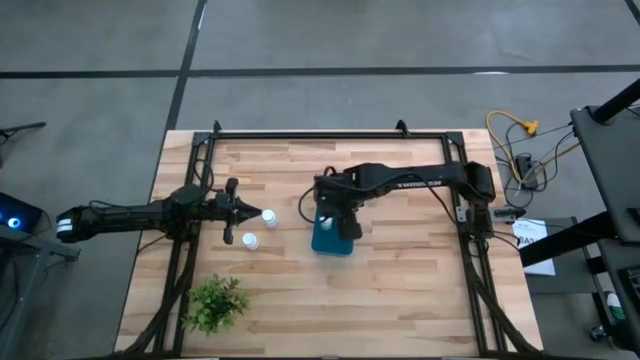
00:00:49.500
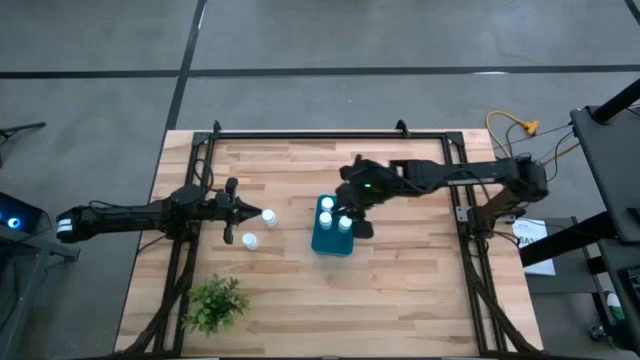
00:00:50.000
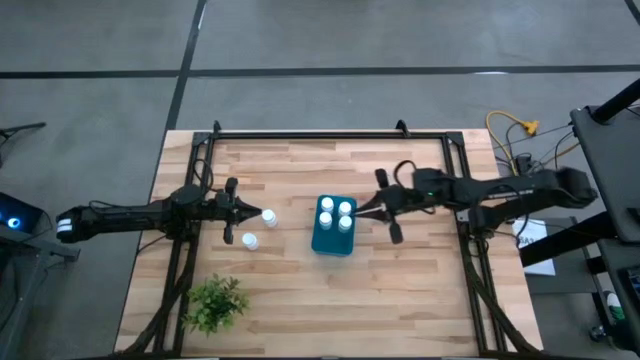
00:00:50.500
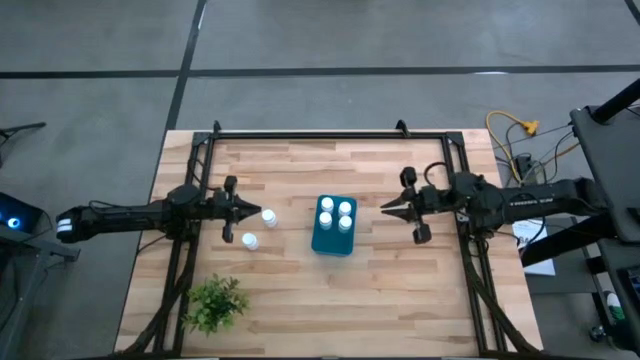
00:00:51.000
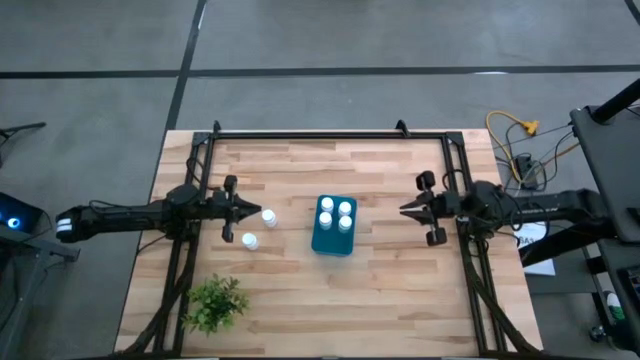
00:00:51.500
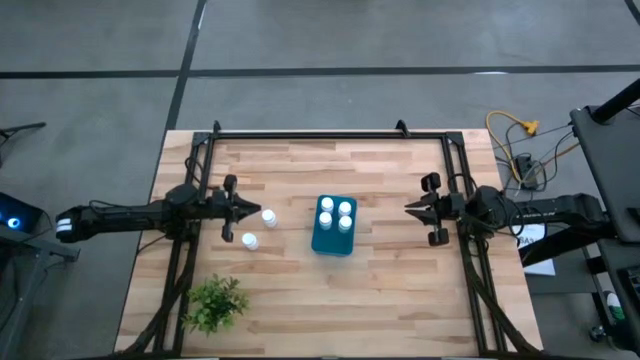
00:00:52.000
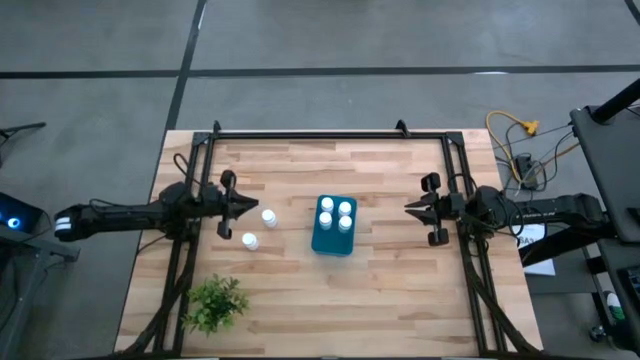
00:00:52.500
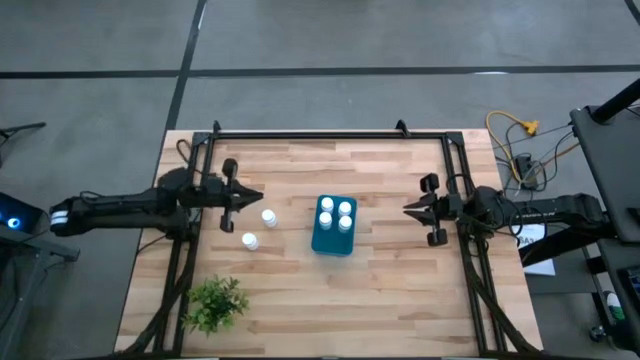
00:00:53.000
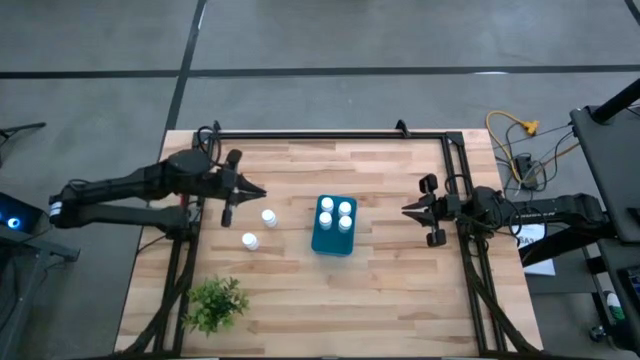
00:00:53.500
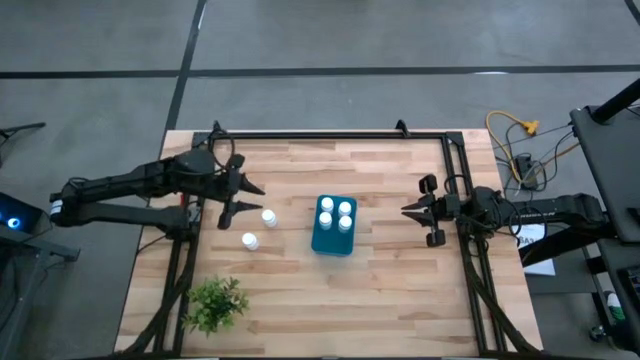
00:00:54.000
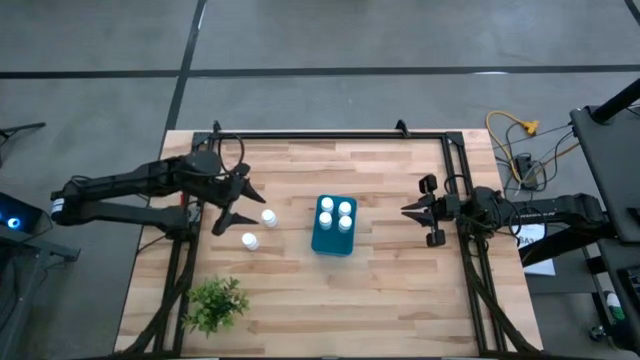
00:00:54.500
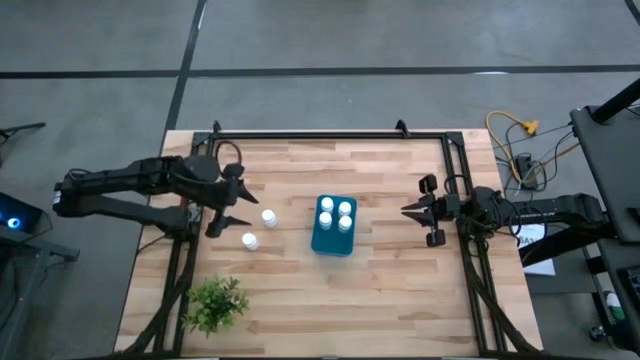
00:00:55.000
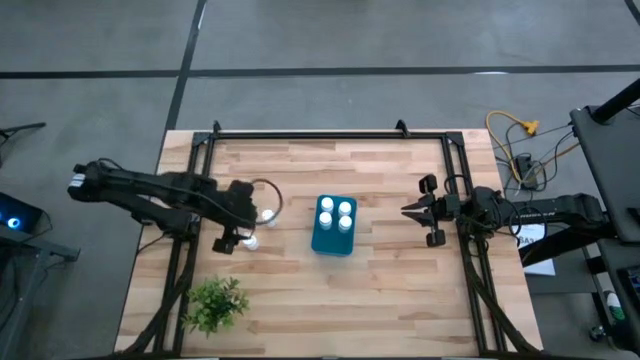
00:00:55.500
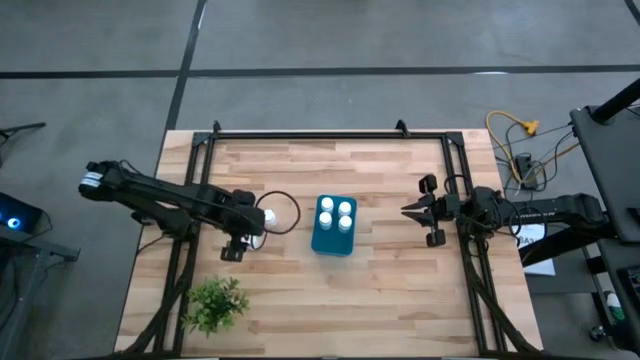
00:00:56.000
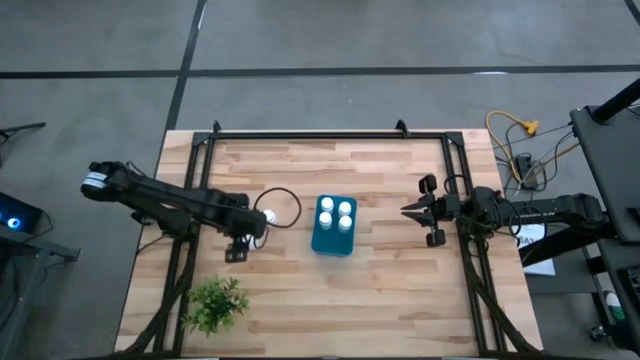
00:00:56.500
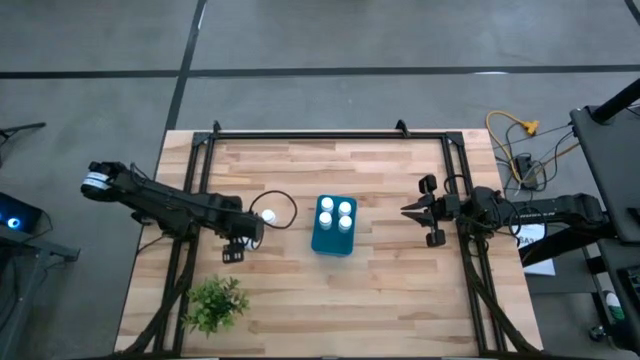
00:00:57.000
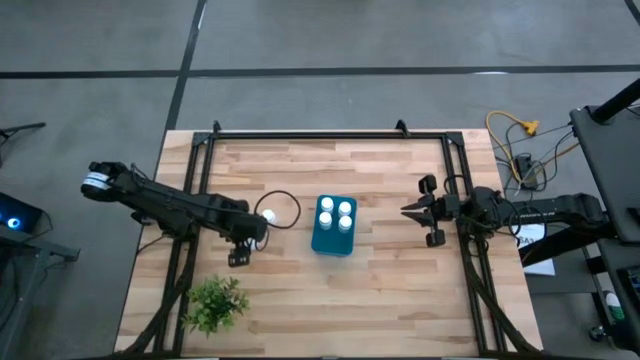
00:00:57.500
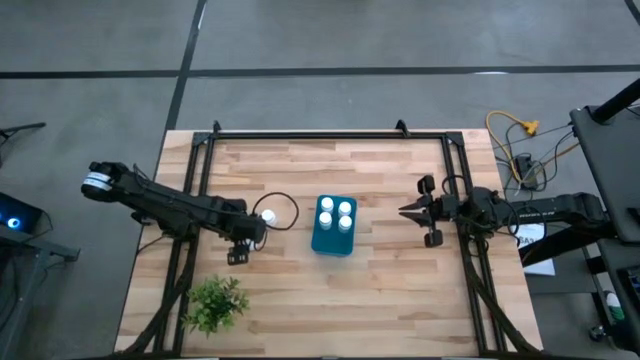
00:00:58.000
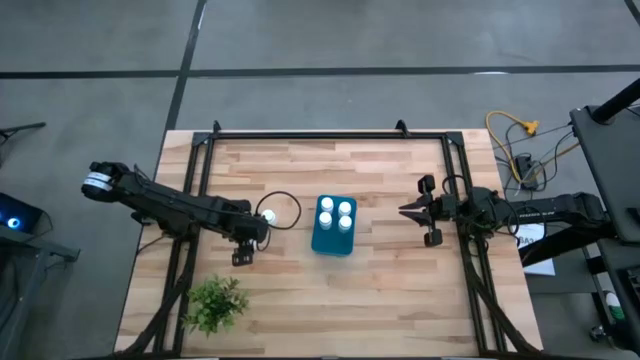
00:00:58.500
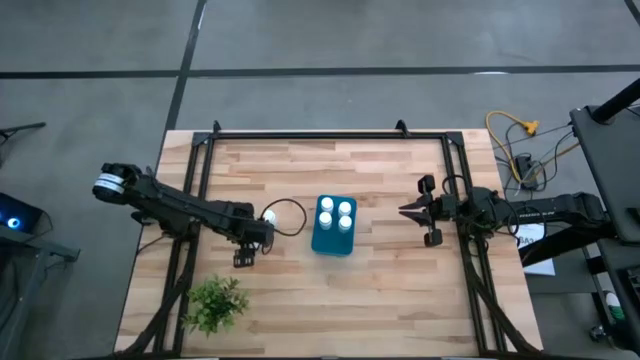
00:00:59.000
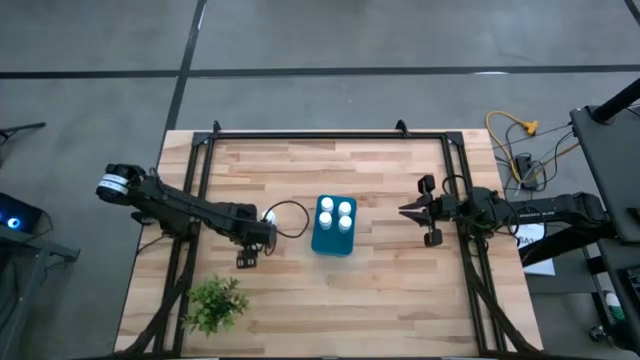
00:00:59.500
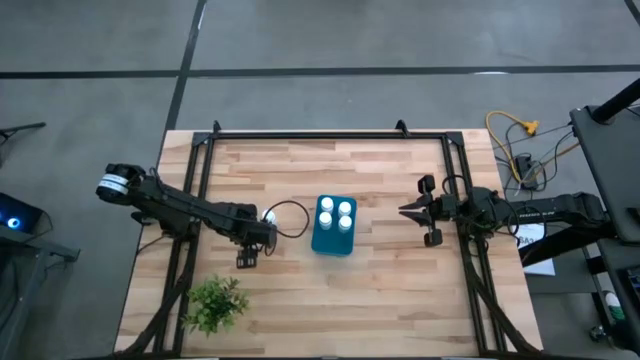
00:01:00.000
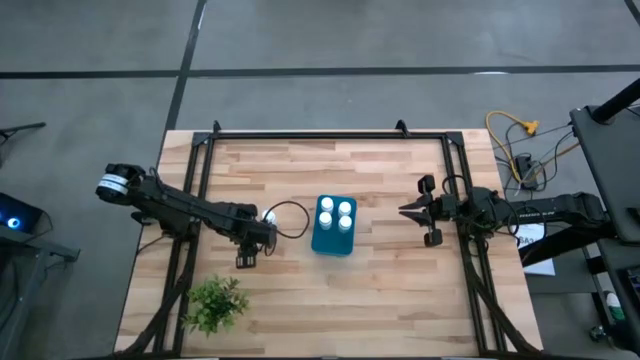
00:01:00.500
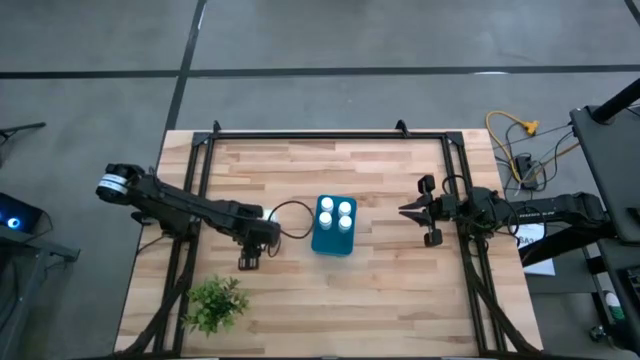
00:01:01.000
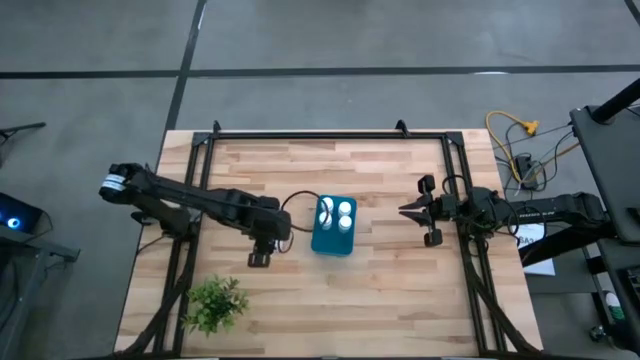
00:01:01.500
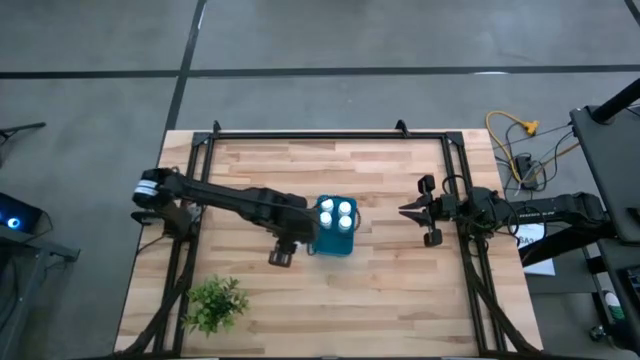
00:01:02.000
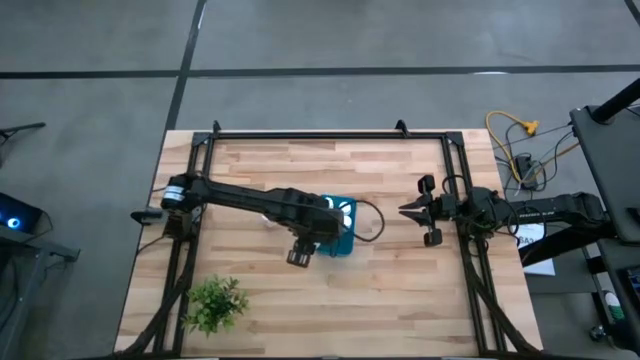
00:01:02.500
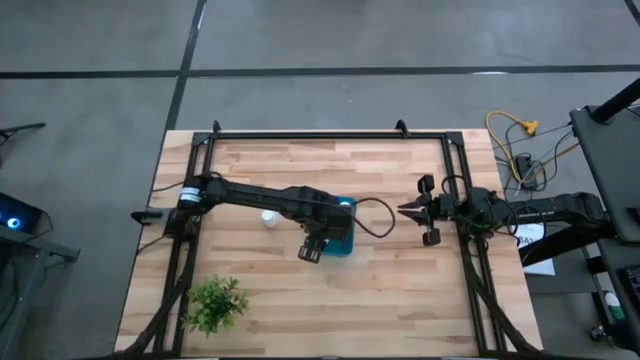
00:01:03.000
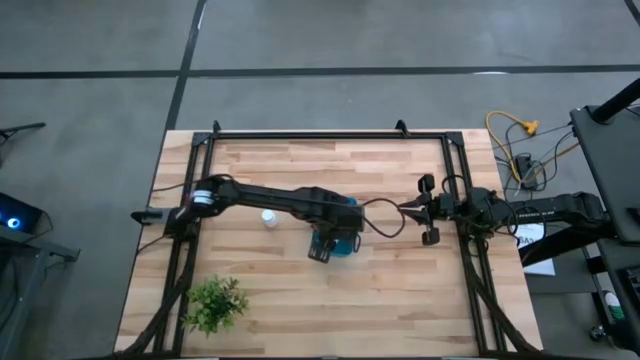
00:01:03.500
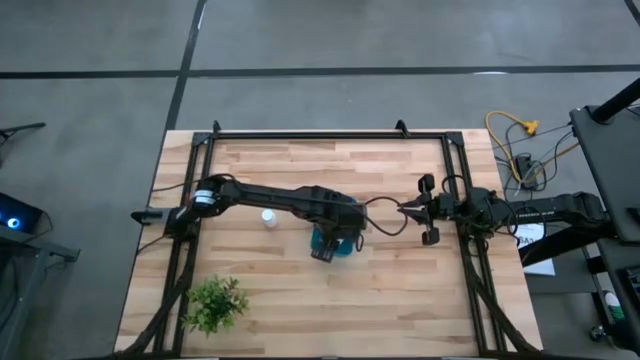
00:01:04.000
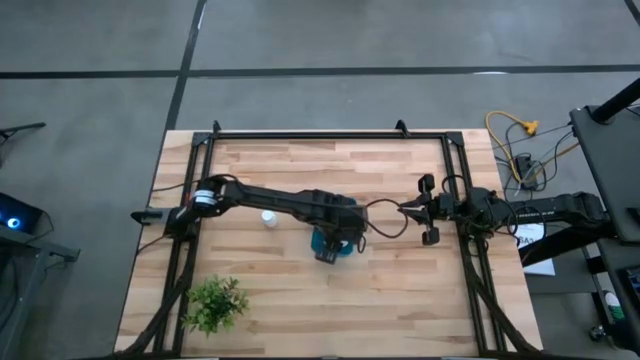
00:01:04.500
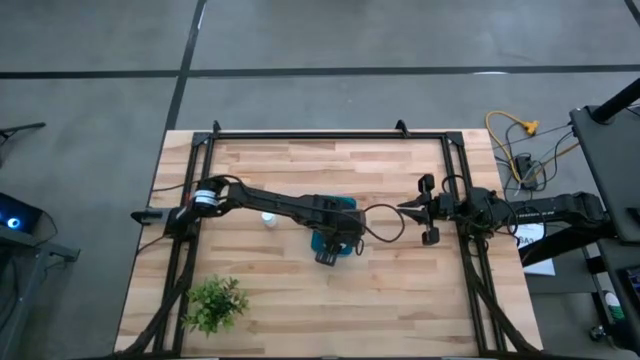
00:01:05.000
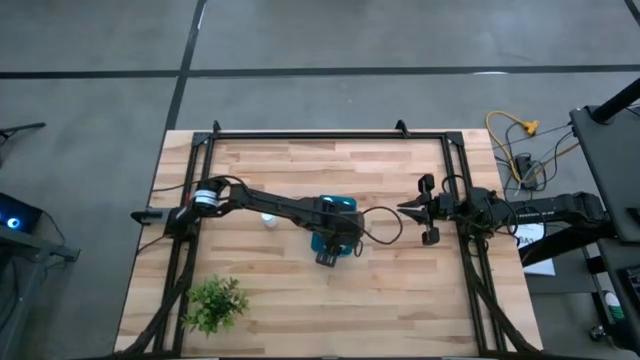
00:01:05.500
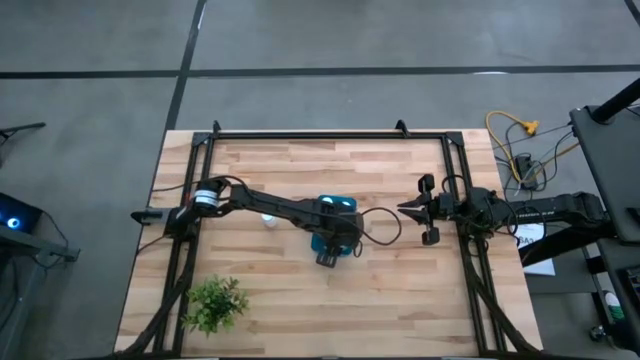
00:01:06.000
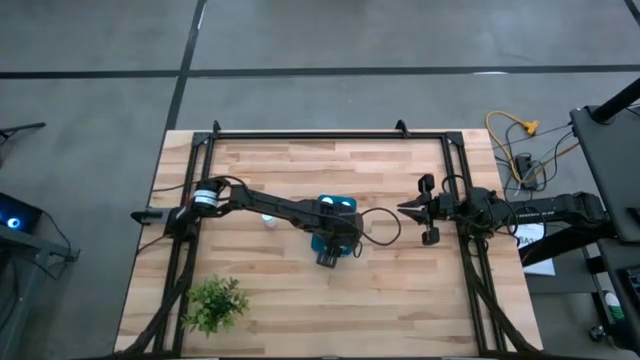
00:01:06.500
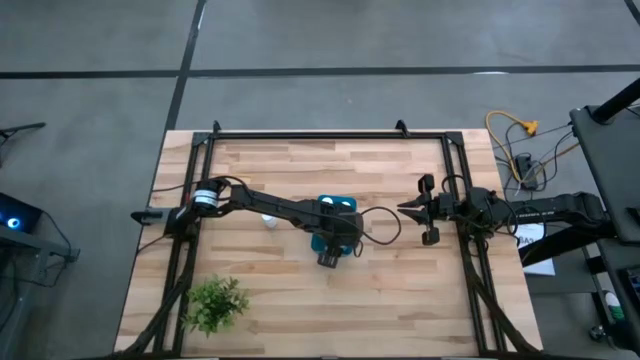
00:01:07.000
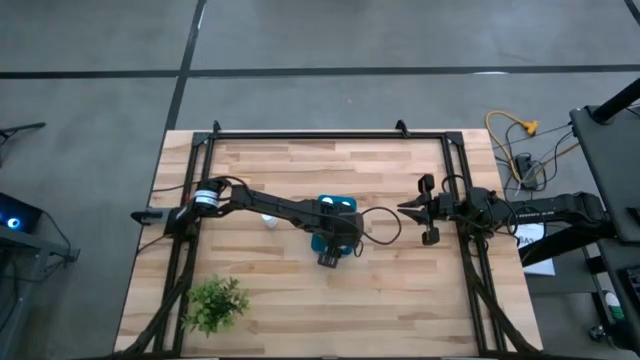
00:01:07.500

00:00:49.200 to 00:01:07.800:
Task: Pick and place pill bottles into a basket
Put the medicine bottle into the blue bin

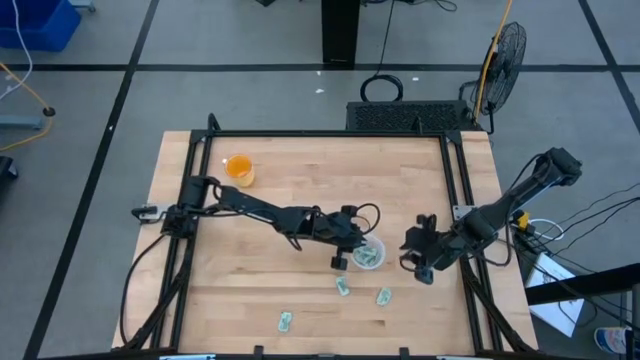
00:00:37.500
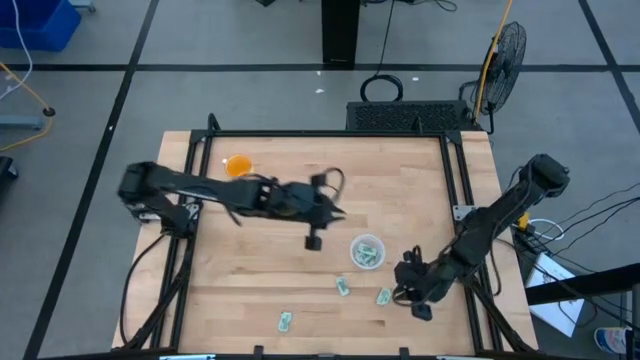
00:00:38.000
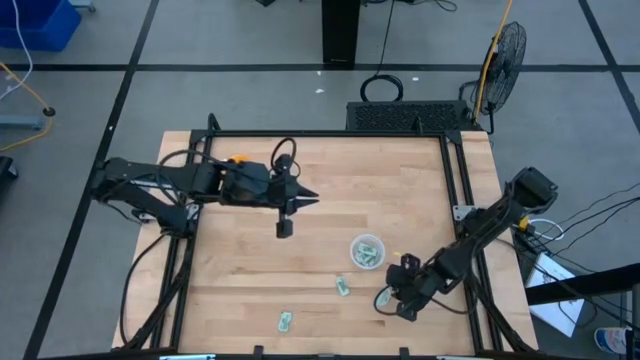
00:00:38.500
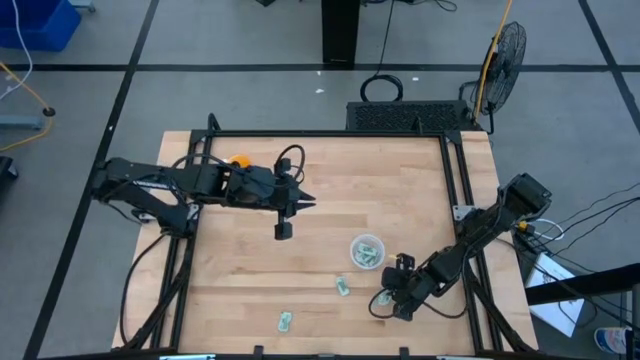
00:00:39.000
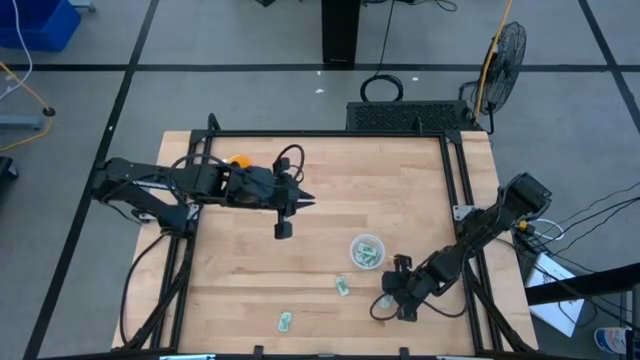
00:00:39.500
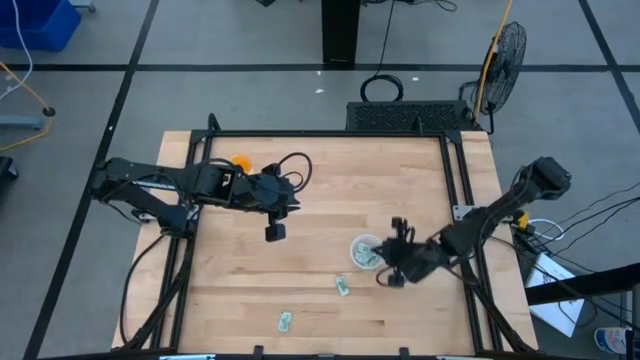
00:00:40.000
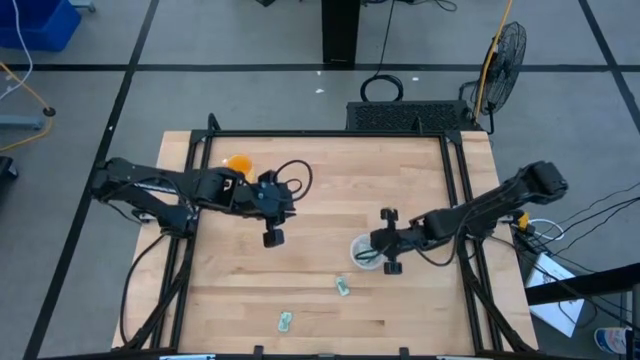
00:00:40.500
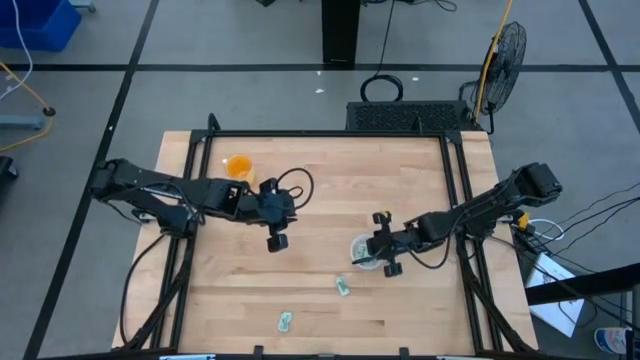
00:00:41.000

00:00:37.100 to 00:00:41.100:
Task: Pick and place Stevia / Truvia into bins
Put the stevia packet into the transparent container
